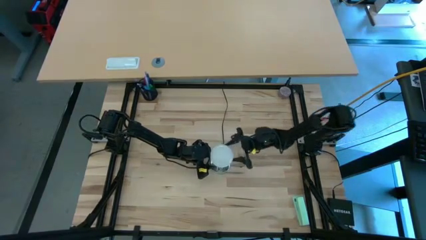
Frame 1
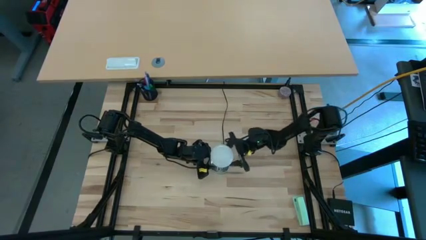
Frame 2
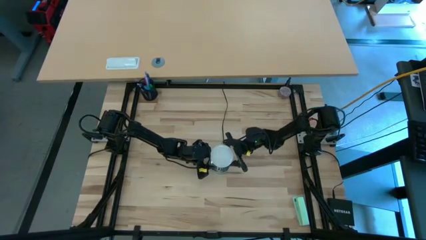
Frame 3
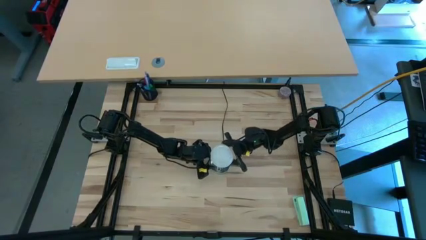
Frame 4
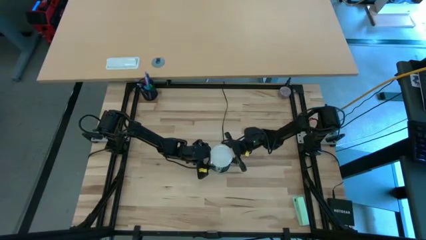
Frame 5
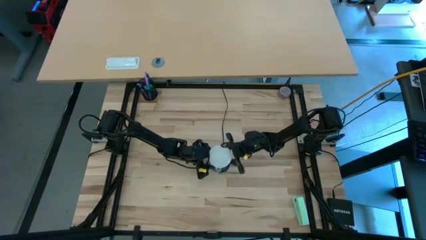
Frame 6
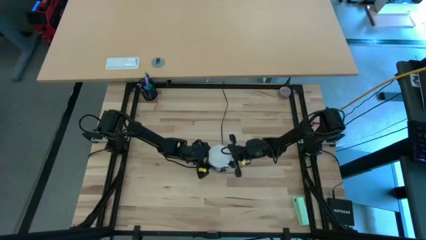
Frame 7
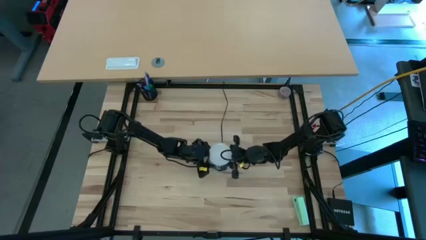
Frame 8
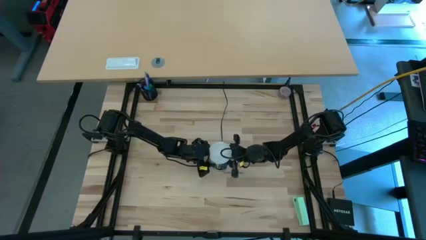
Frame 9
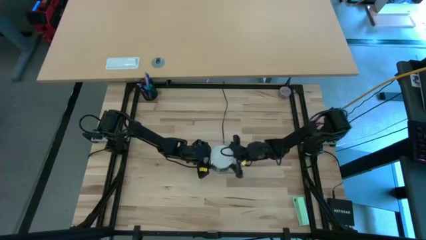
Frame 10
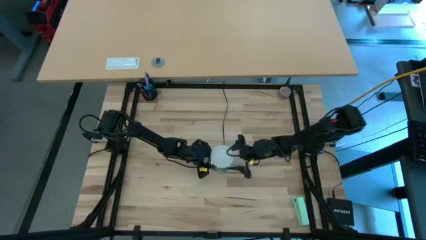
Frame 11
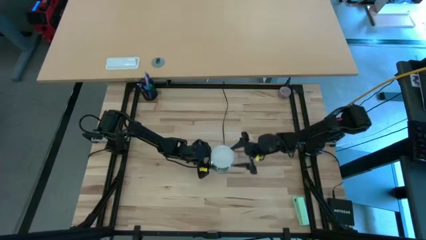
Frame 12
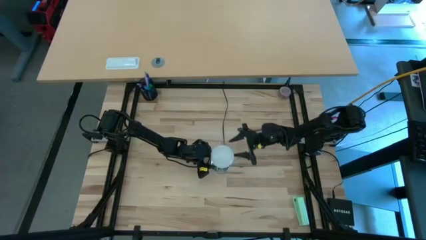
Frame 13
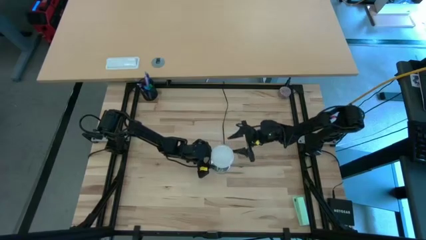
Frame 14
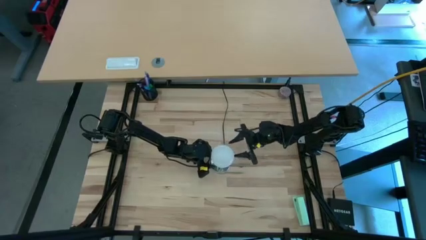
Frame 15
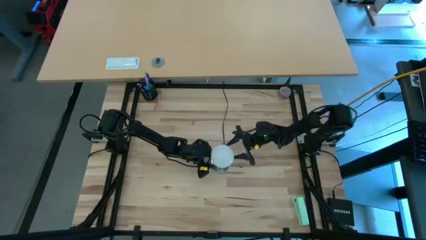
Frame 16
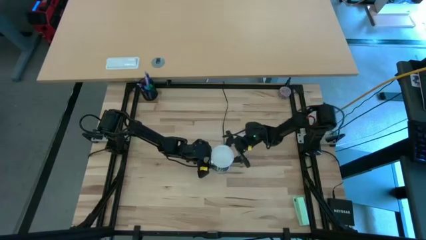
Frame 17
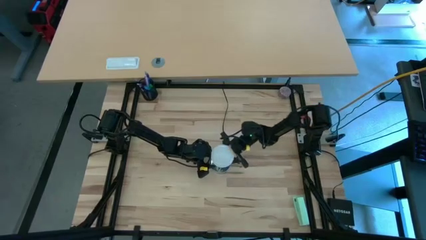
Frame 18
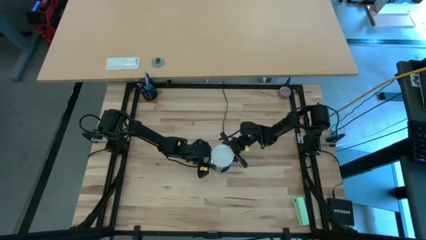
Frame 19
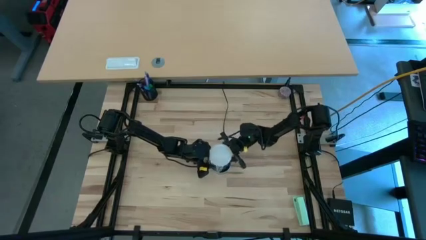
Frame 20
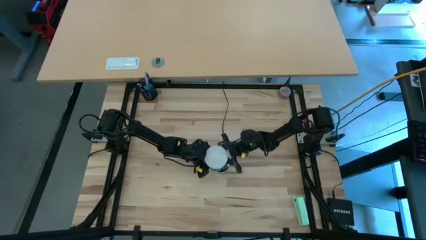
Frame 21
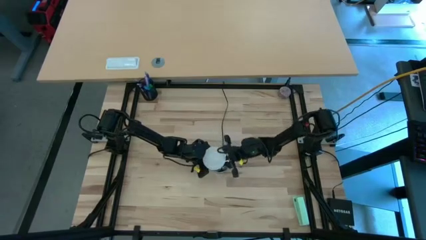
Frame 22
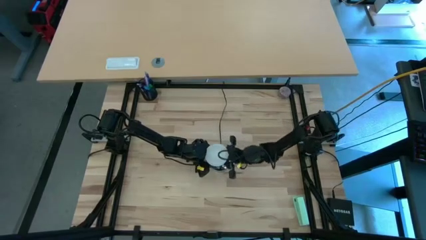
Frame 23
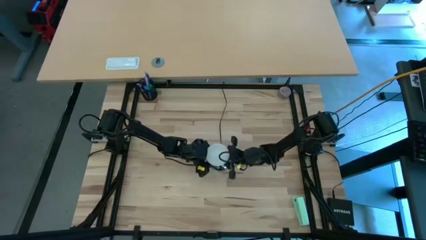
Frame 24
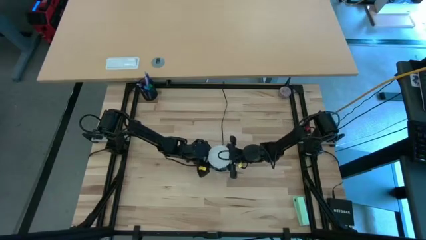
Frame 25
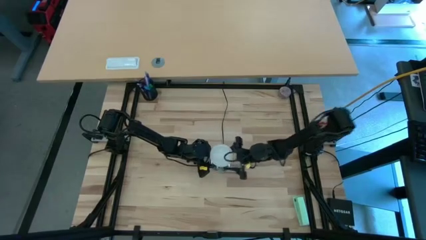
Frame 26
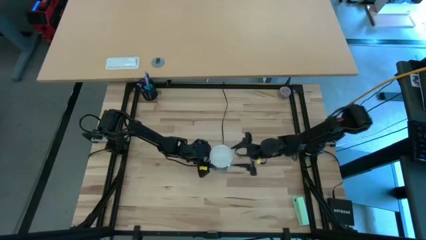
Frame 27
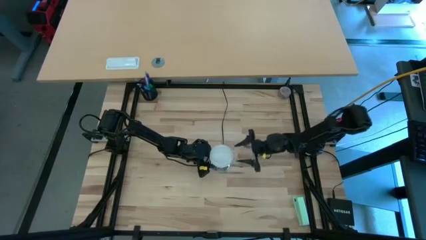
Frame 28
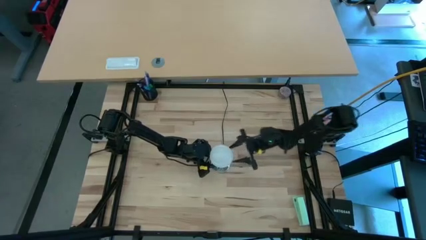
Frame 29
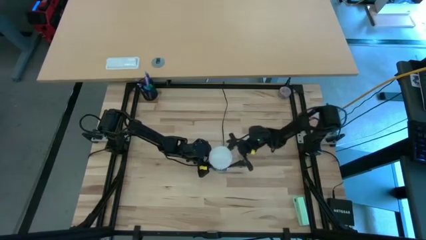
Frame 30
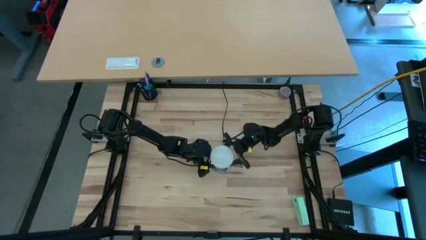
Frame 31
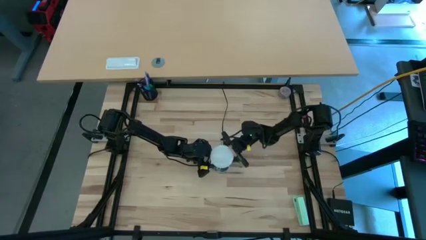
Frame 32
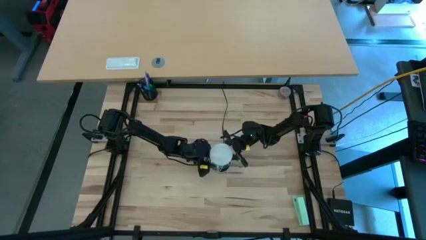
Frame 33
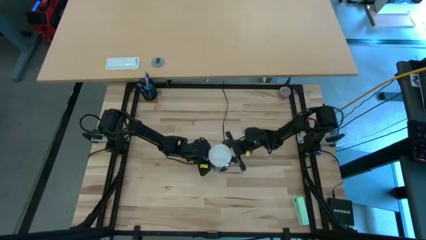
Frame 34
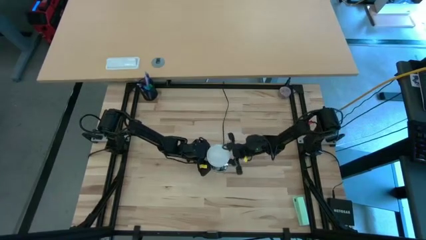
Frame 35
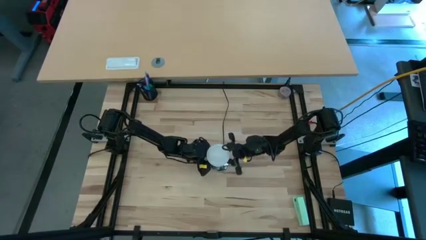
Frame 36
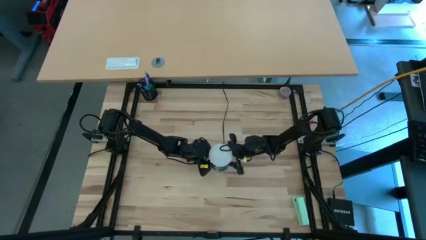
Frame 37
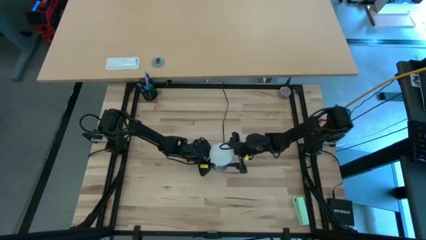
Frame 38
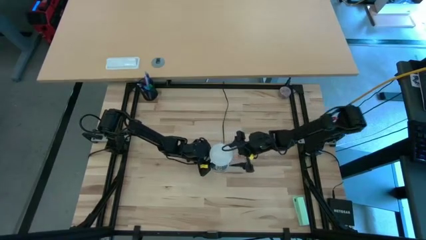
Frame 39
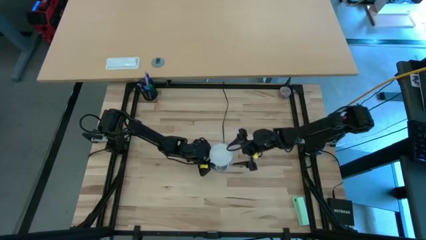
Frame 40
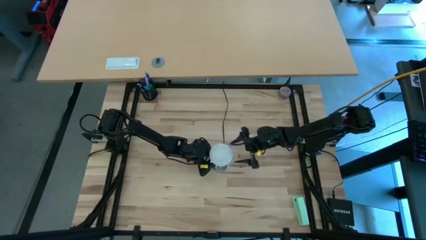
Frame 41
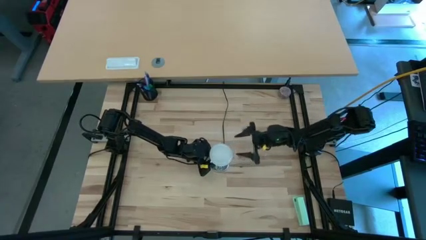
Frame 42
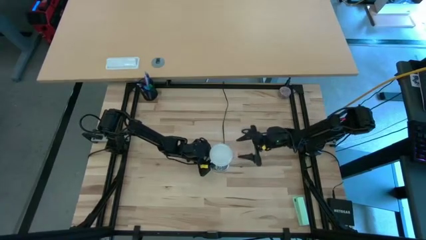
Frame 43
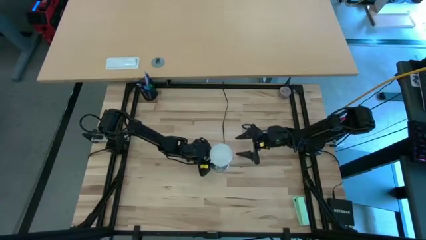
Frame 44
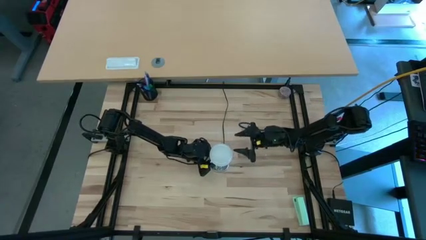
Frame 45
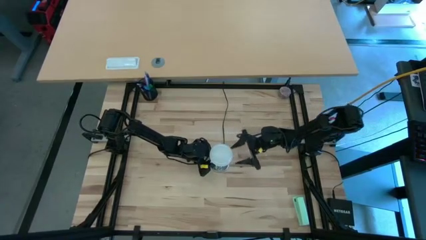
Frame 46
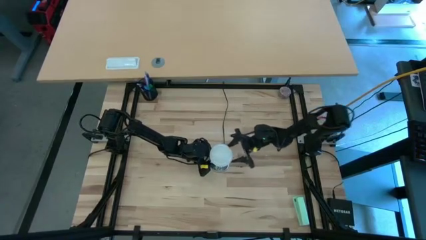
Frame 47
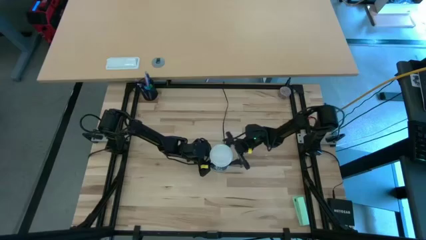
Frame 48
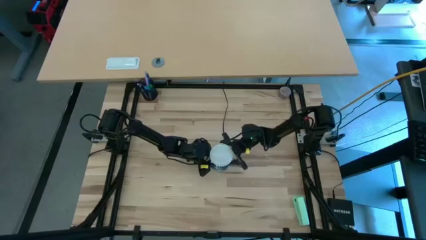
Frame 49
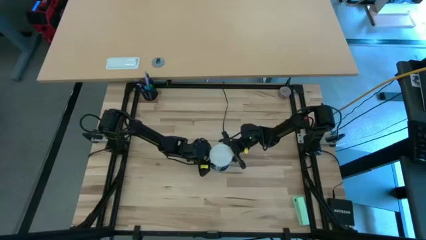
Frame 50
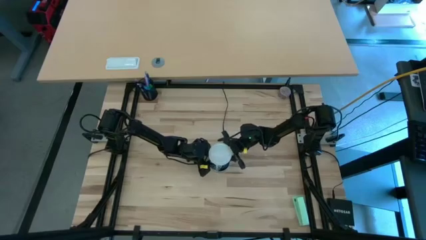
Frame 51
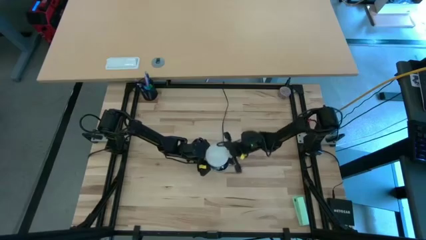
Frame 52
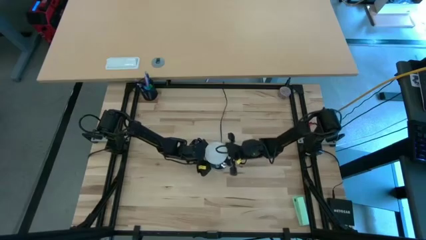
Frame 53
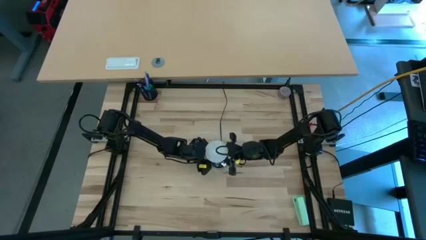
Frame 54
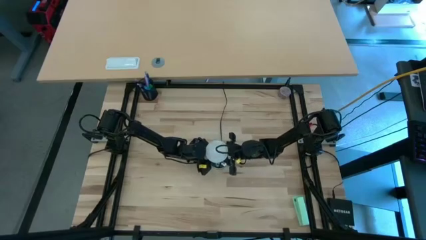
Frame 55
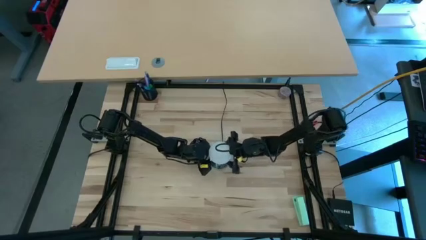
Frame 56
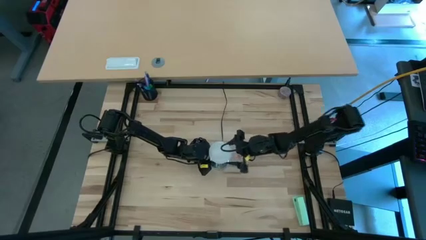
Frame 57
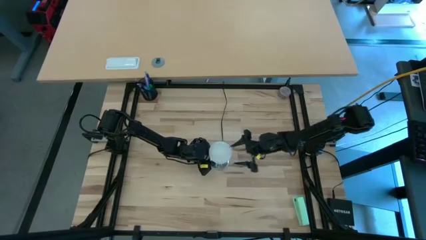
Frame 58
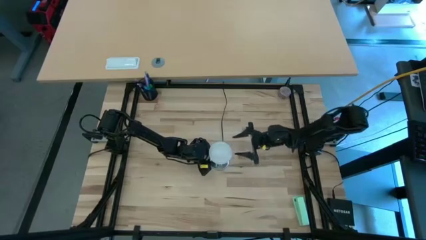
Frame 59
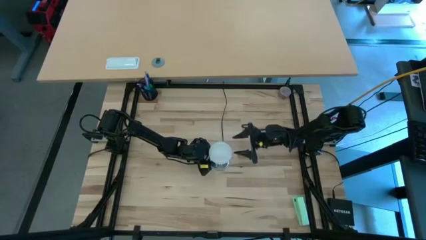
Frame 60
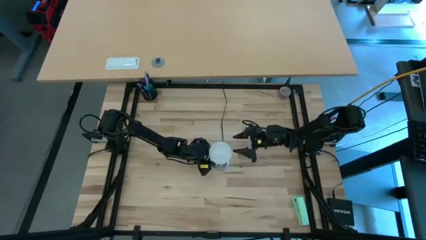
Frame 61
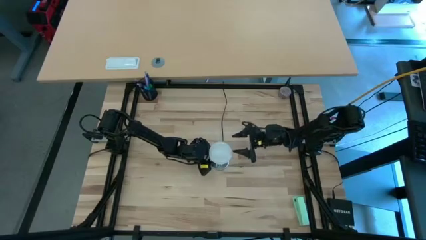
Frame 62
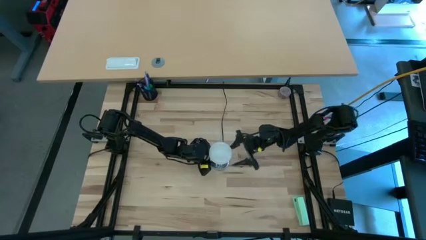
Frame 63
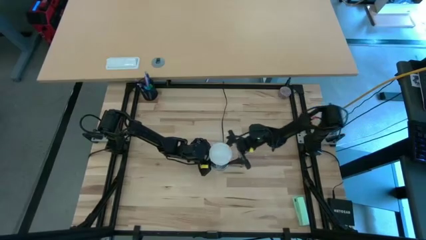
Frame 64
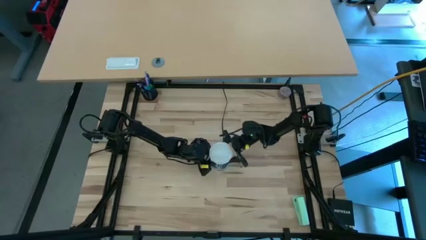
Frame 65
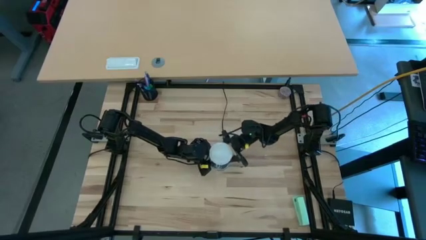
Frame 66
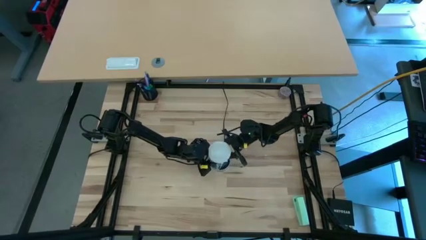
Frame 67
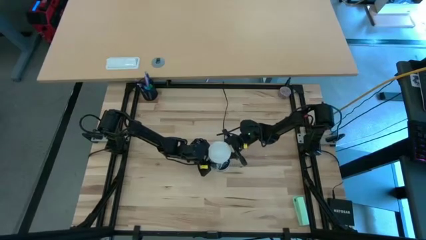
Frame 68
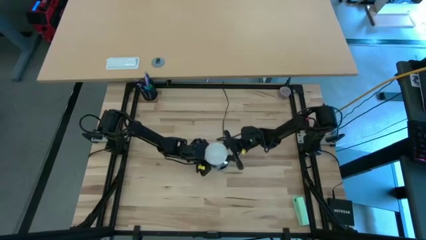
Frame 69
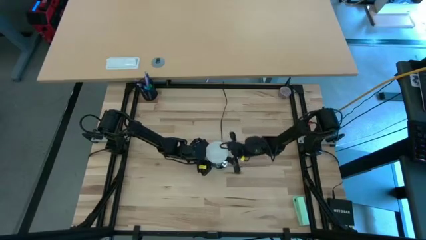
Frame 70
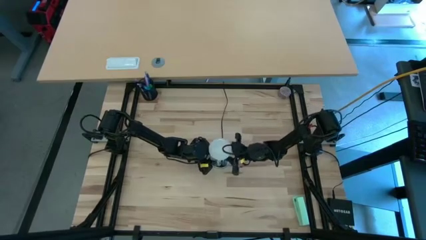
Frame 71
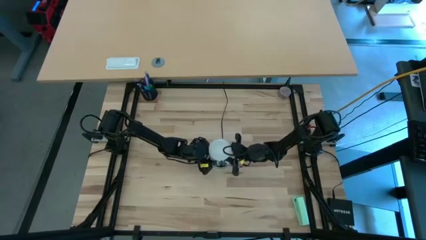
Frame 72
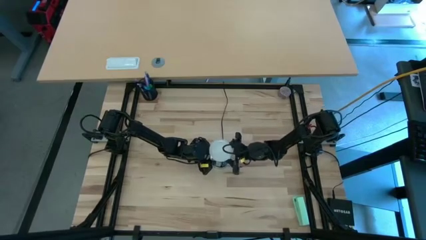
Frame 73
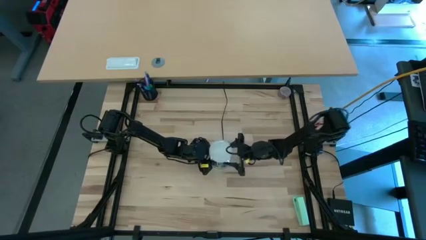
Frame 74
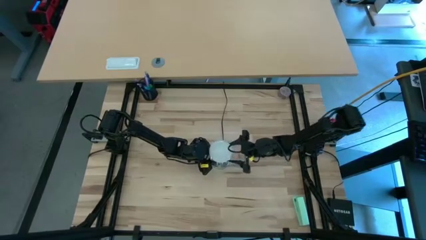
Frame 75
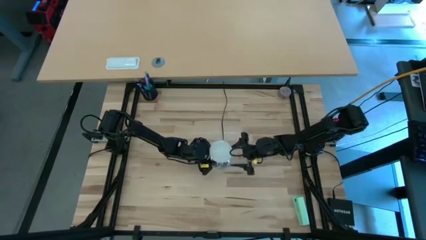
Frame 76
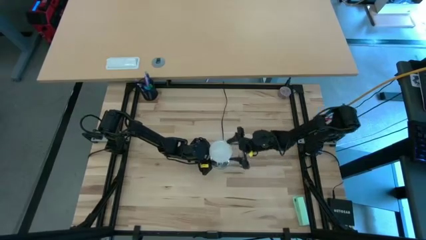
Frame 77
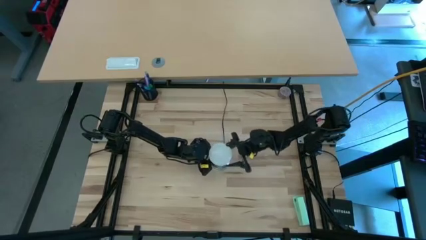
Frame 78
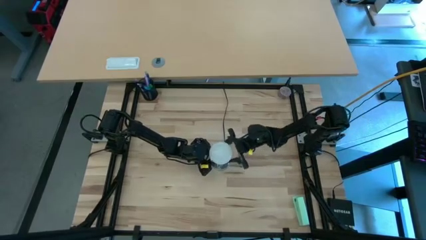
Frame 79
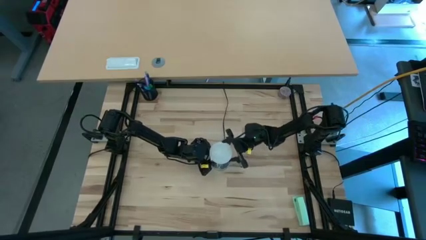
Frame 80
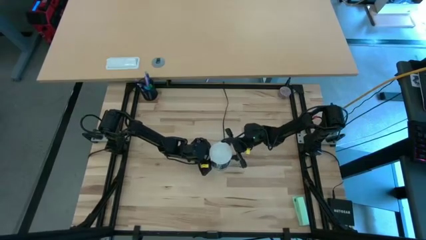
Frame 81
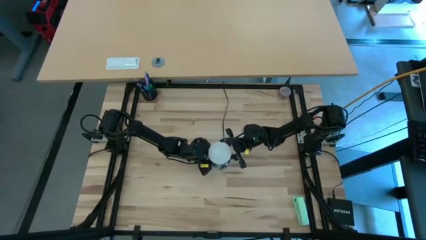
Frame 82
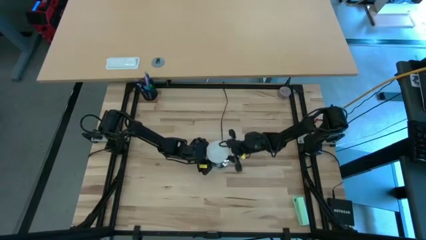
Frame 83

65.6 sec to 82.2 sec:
Task: Screw lightbulb
Insert the lightbulb into the lamp
